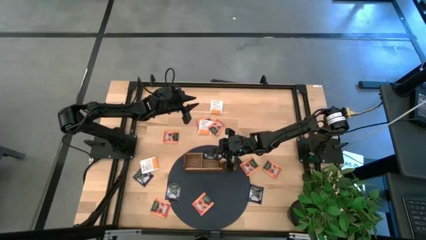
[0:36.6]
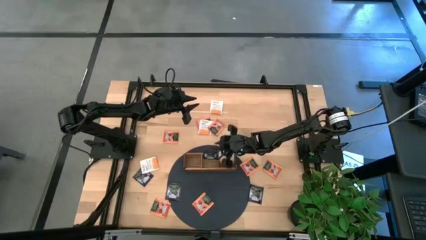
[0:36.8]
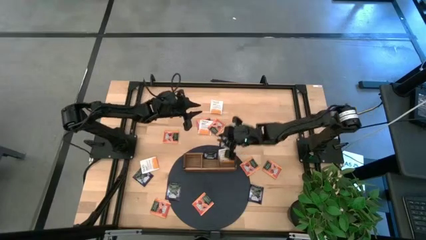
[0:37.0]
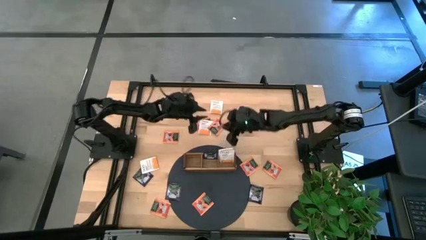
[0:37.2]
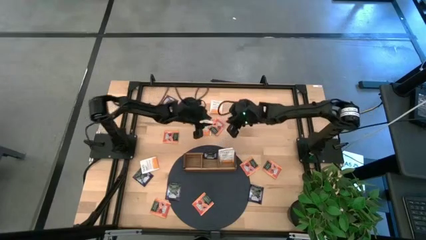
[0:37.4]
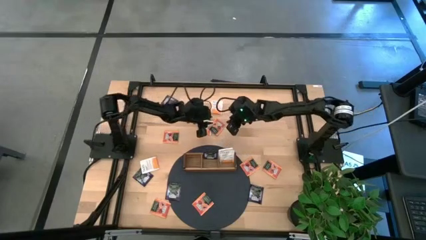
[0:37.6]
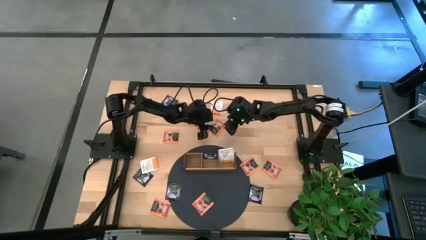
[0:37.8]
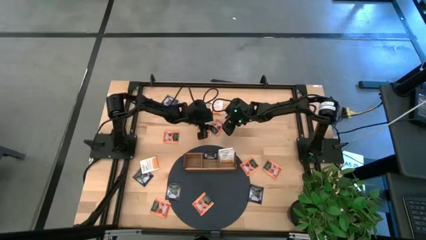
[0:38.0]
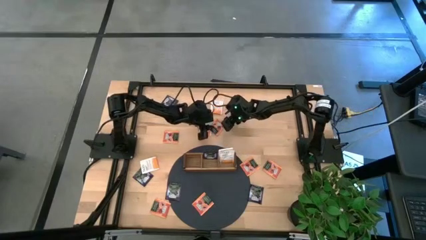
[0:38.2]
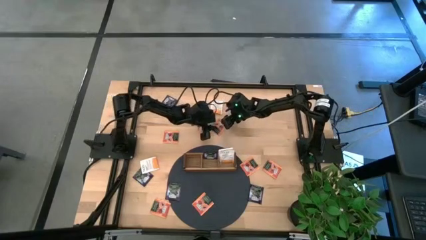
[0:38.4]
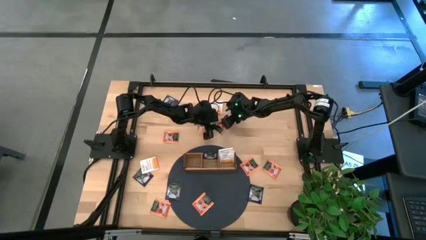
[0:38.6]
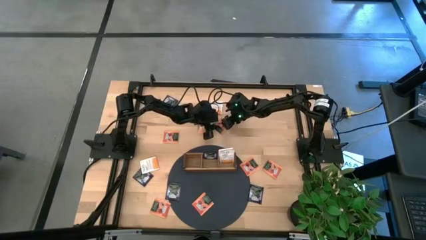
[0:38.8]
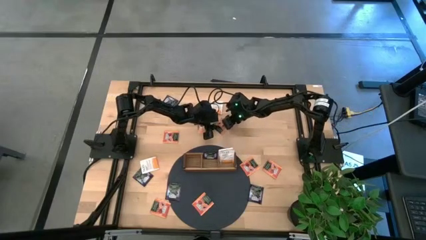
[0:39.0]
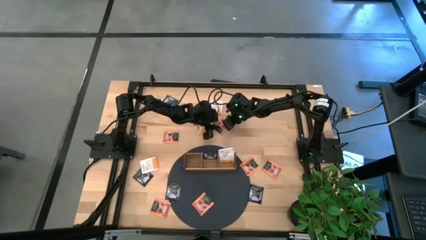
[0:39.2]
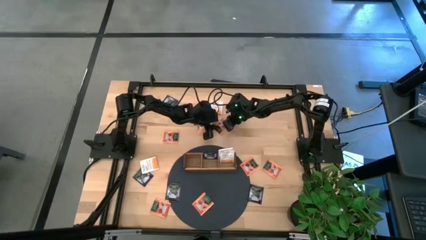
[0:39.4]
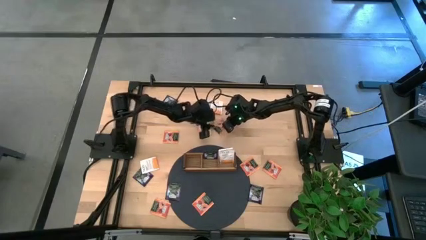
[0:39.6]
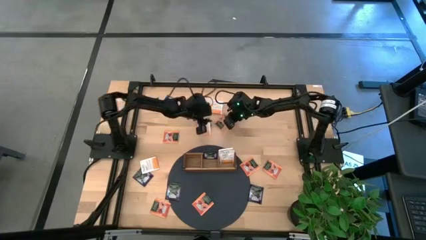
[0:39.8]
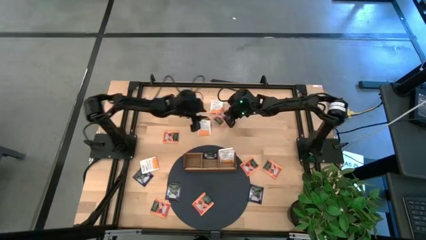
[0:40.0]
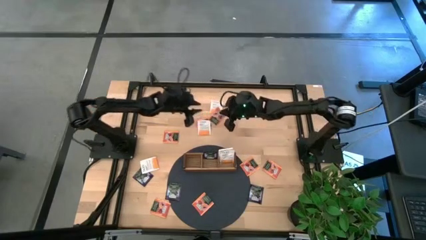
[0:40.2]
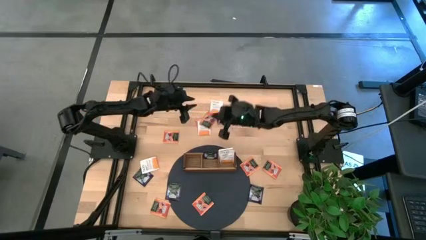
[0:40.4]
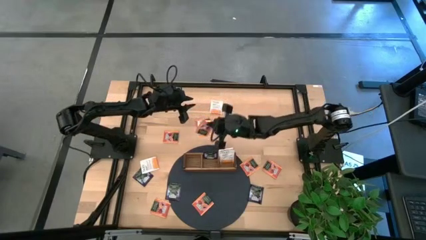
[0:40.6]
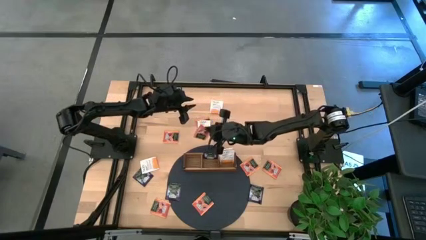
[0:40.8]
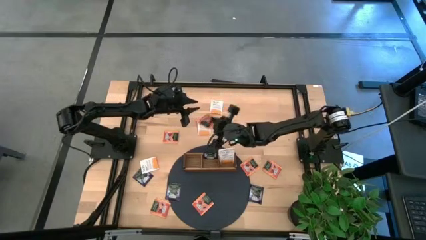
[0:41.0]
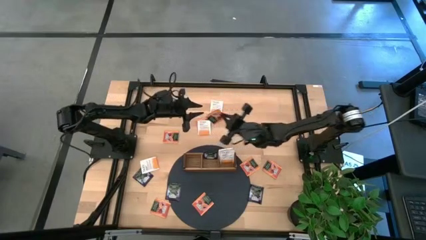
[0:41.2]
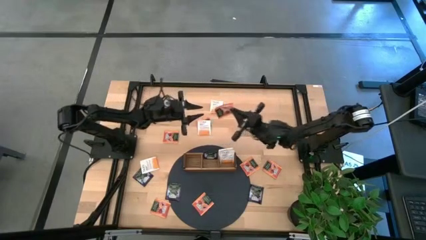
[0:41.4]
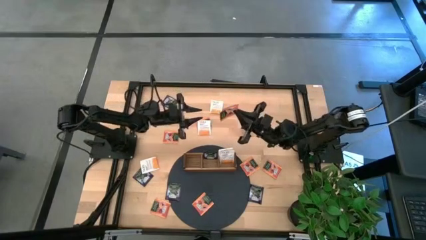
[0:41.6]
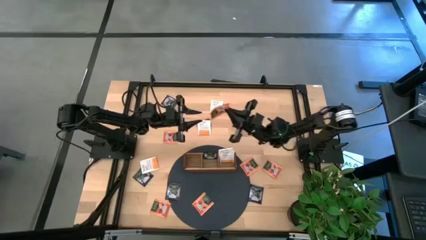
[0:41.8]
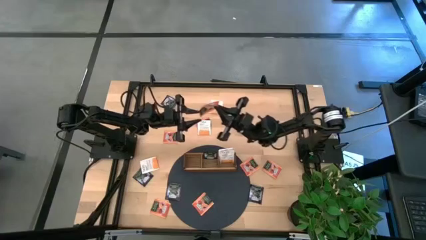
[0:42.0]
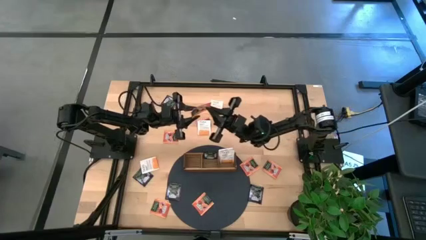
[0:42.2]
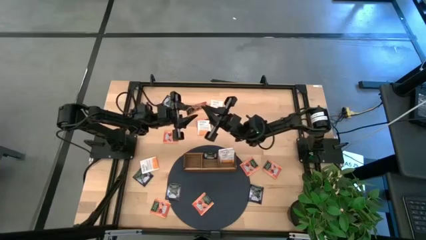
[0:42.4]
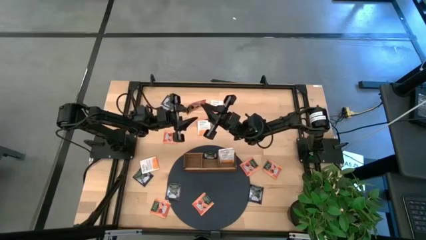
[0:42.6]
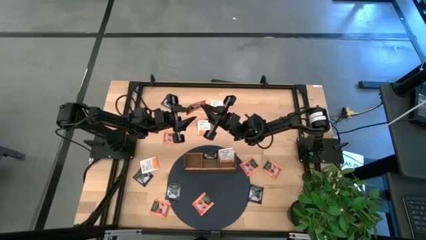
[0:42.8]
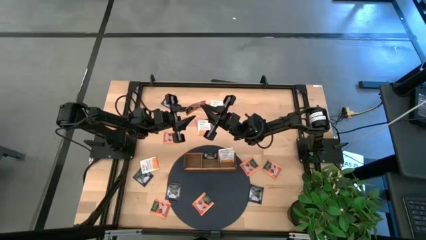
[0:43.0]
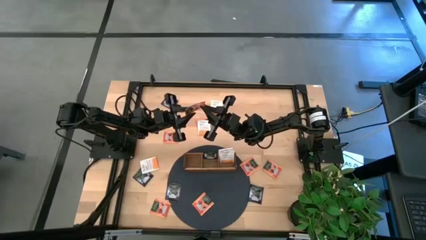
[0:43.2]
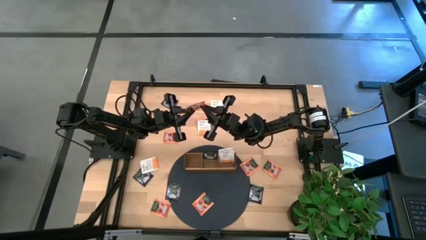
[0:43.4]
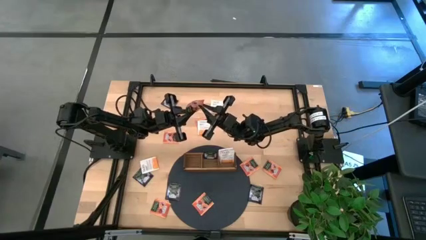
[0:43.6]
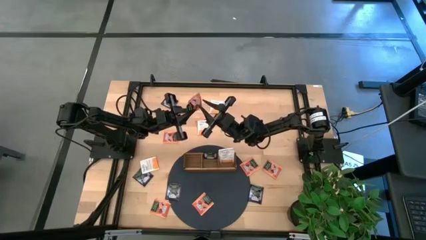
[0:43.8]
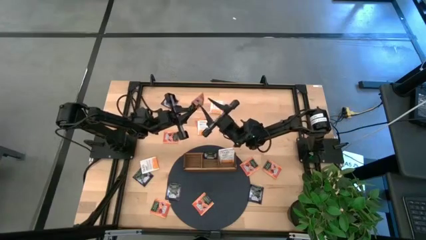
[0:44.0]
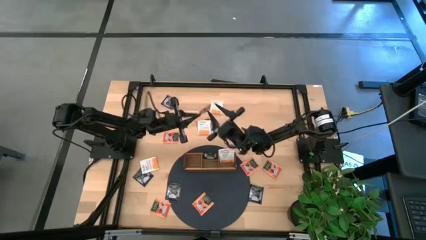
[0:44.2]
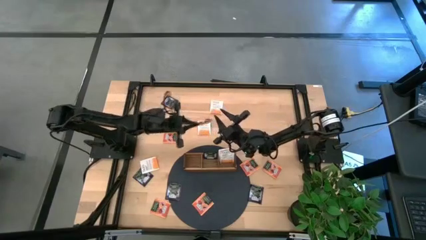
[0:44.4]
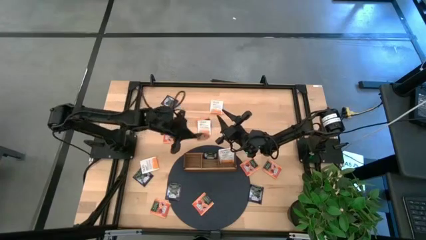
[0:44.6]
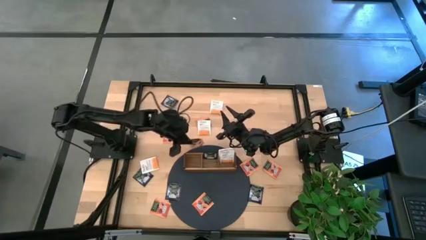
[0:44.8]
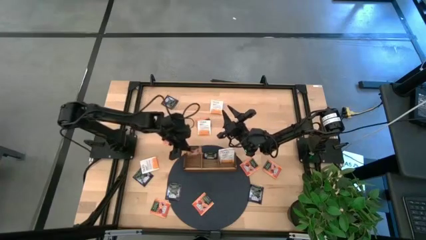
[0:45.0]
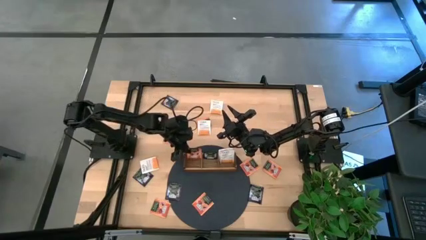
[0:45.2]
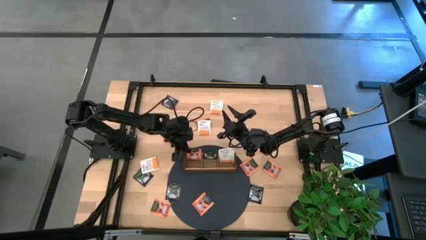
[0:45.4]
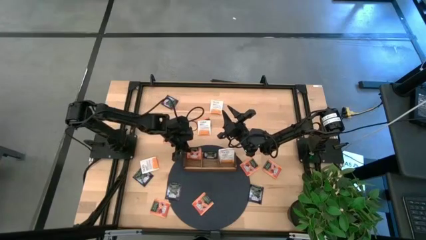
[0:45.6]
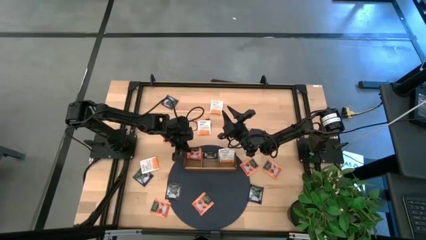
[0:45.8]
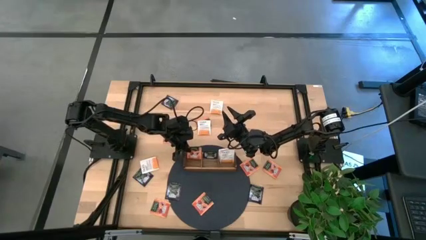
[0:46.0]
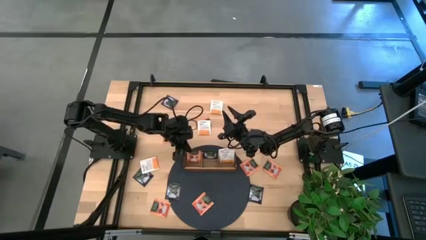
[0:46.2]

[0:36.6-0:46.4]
Task: Pick & Place Tea
Put the orange tea bag into the left section of the wooden organizer

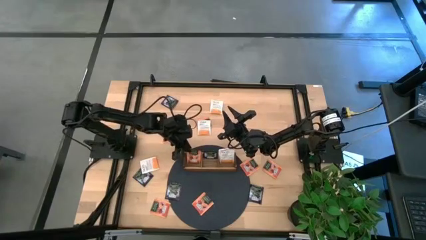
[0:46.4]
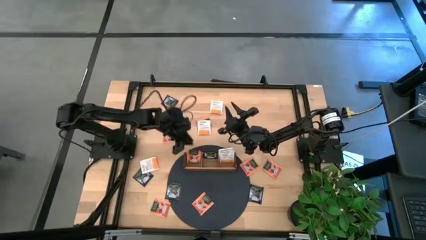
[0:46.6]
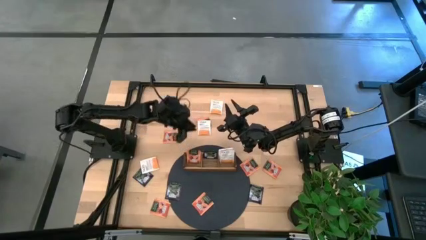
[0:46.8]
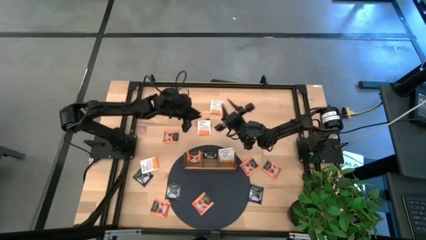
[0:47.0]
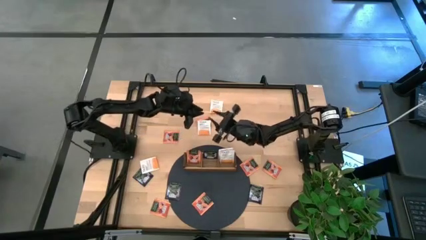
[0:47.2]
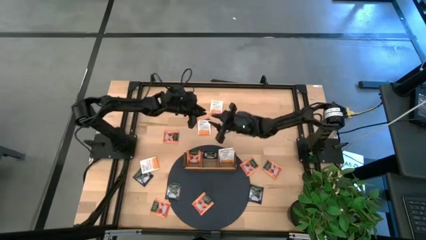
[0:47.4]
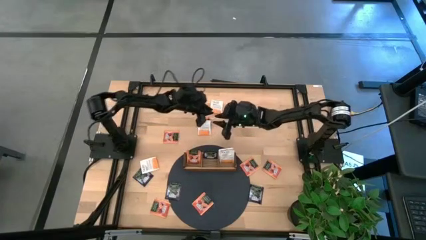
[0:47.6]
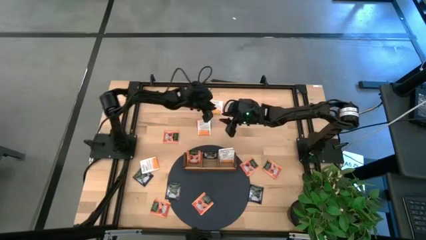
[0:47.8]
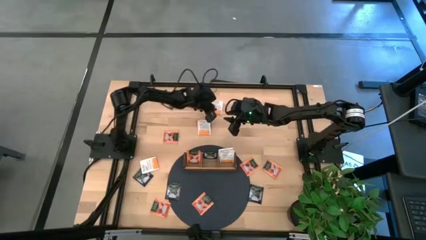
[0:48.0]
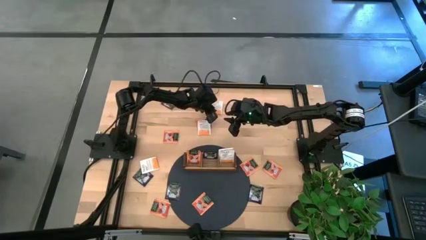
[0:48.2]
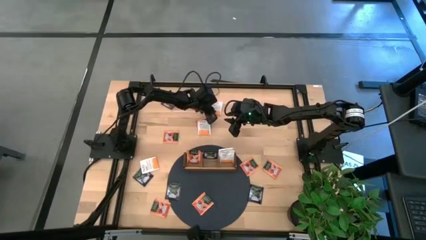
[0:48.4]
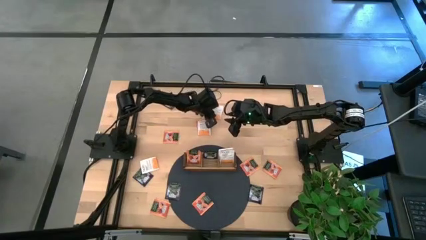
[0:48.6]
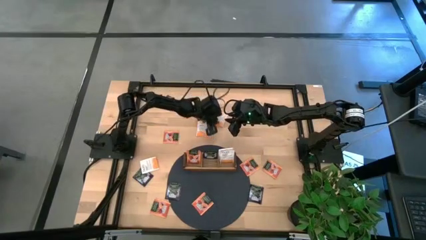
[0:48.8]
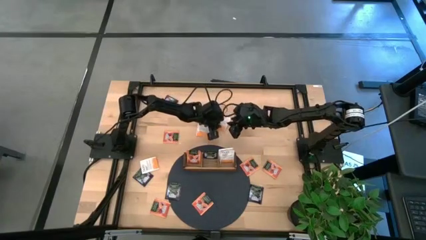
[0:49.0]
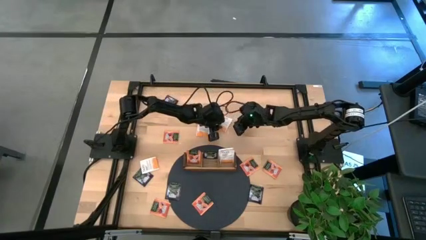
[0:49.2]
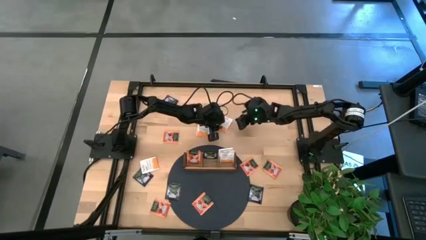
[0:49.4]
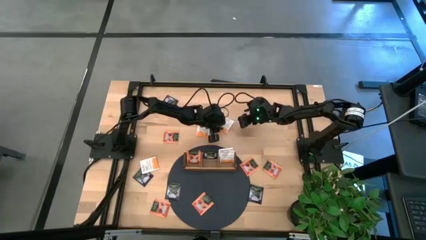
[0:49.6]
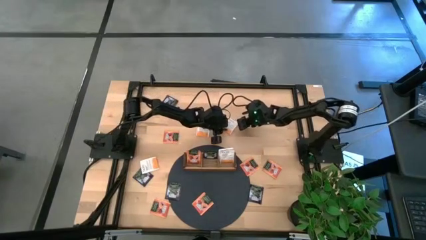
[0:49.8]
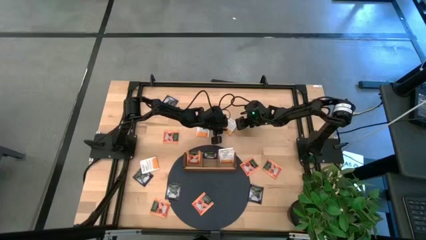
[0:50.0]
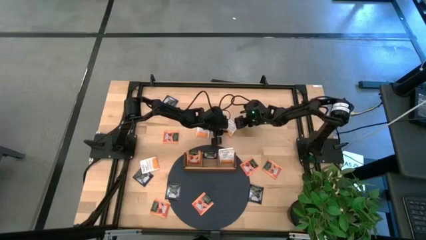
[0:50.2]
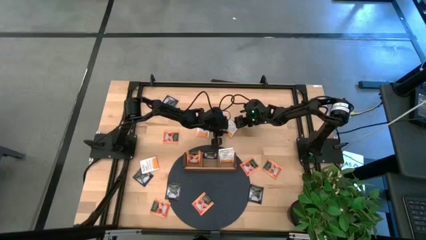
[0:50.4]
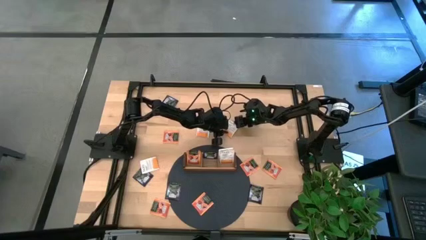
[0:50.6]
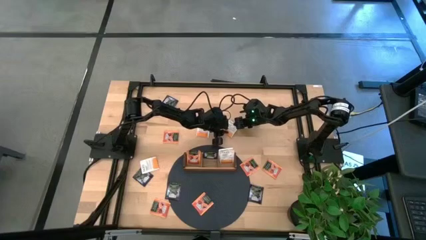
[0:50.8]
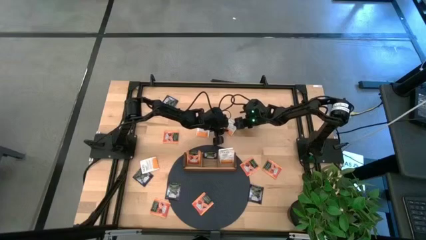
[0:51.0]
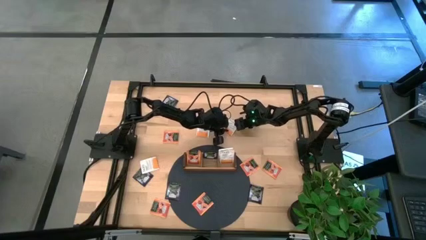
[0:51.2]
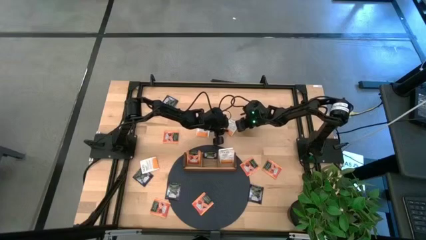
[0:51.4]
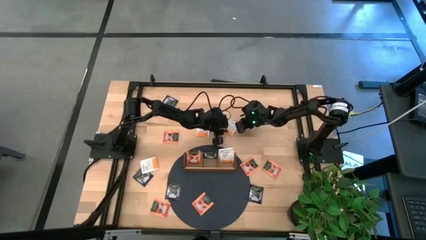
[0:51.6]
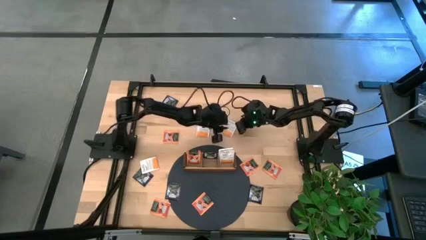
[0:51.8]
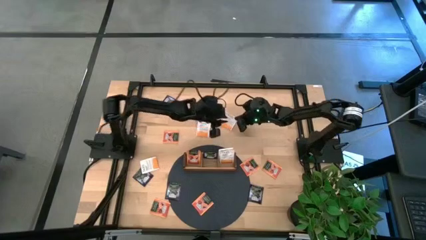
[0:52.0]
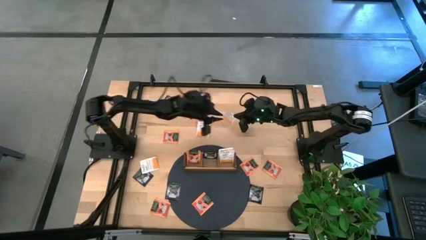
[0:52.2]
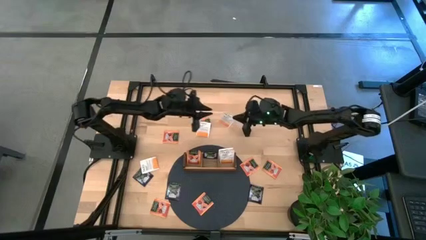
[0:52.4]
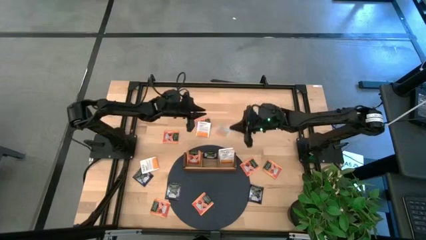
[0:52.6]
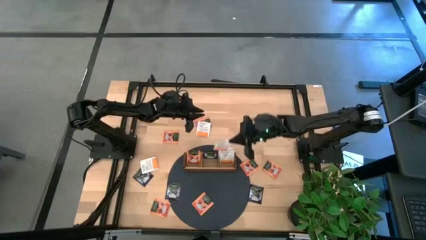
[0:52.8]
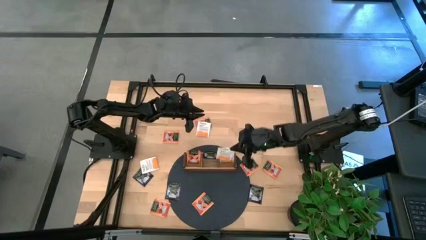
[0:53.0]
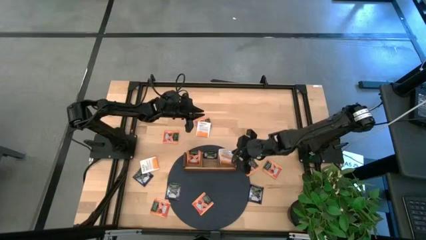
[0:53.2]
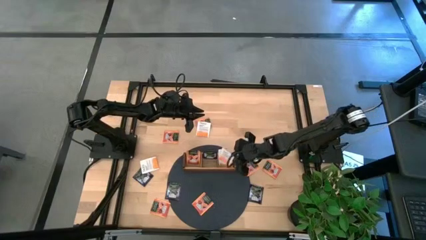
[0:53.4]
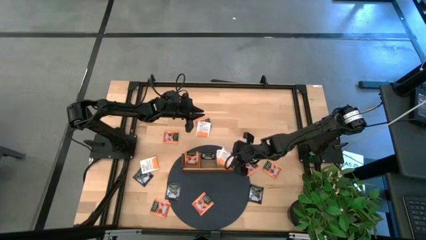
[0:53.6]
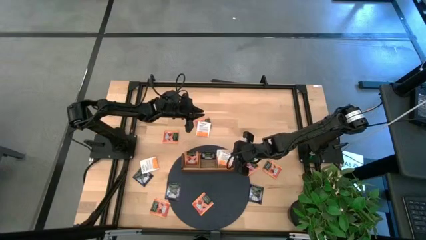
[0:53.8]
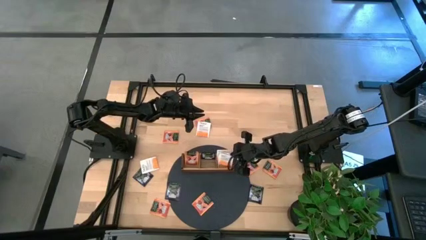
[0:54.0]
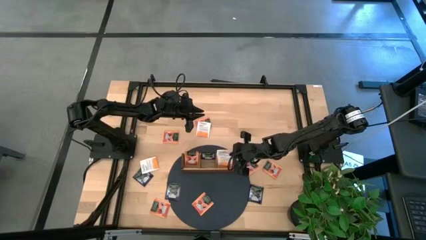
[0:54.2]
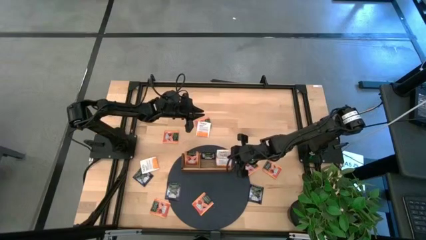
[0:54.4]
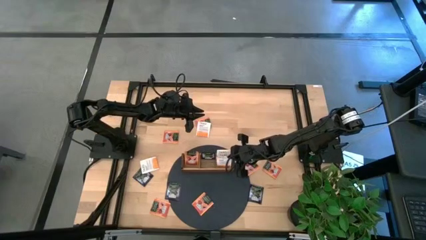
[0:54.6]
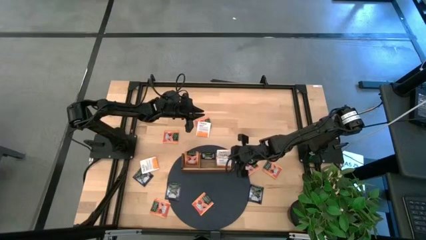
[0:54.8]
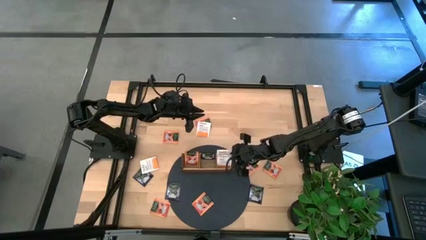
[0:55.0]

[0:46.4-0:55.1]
Put the white tea bag into the right section of the wooden organizer
